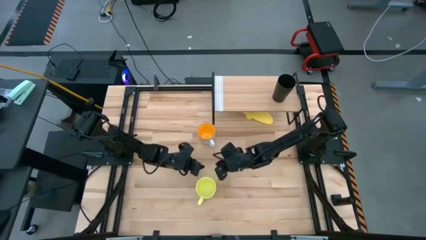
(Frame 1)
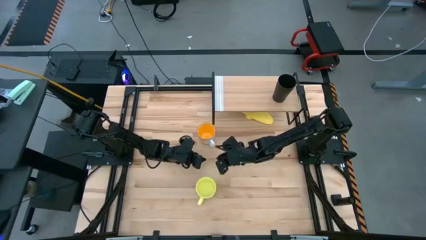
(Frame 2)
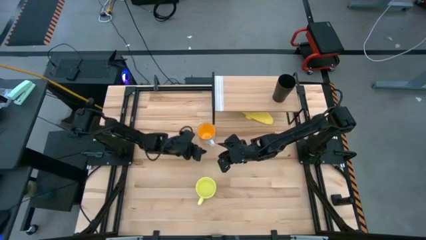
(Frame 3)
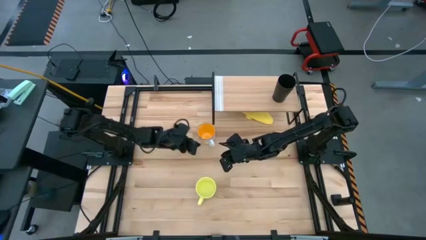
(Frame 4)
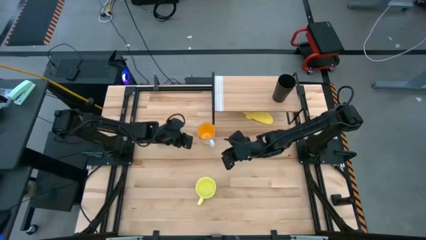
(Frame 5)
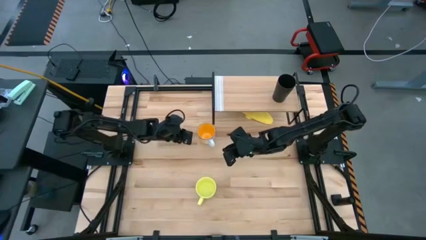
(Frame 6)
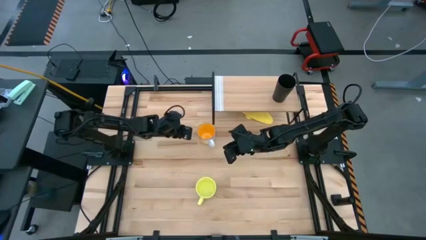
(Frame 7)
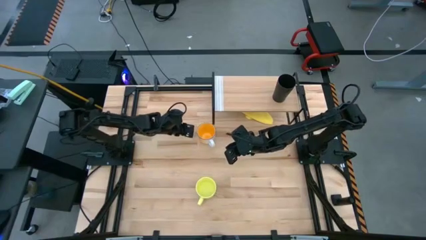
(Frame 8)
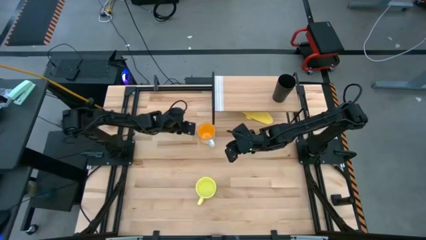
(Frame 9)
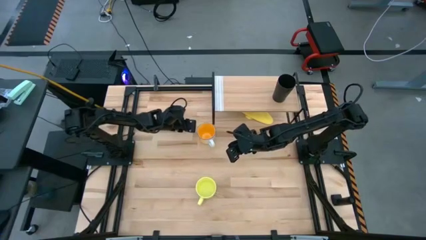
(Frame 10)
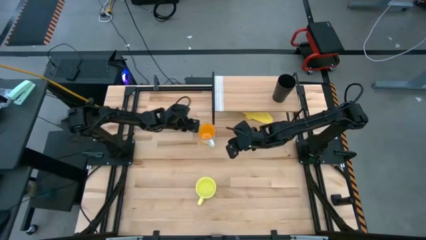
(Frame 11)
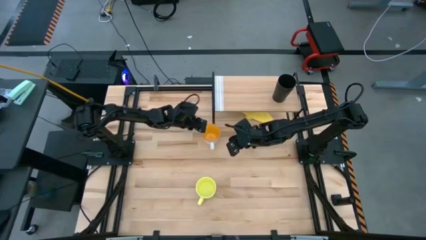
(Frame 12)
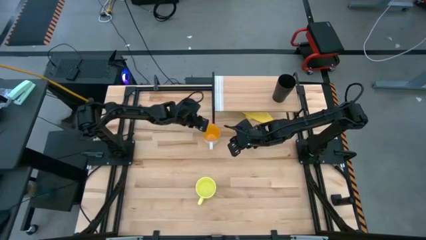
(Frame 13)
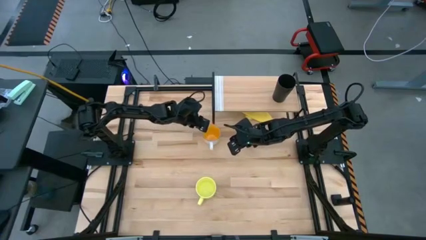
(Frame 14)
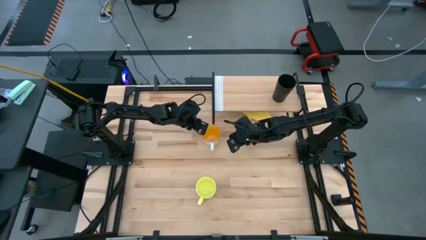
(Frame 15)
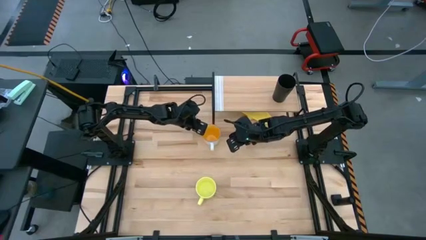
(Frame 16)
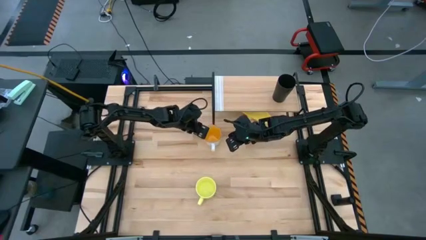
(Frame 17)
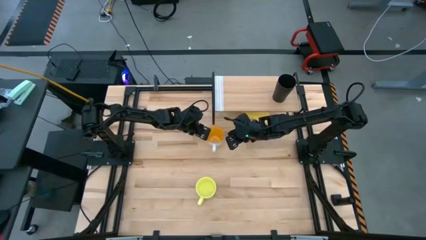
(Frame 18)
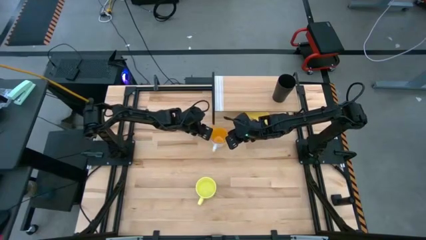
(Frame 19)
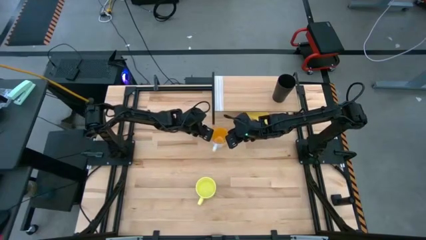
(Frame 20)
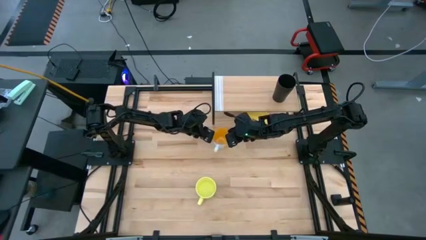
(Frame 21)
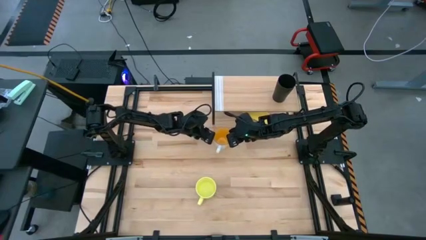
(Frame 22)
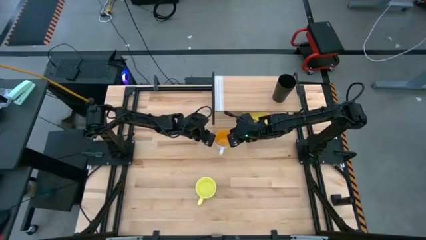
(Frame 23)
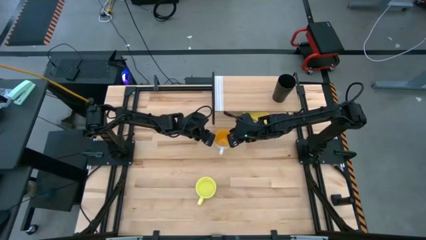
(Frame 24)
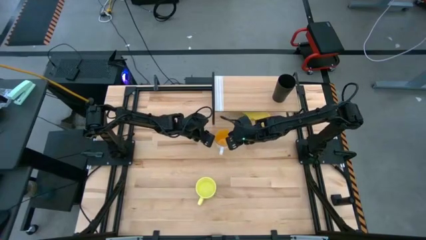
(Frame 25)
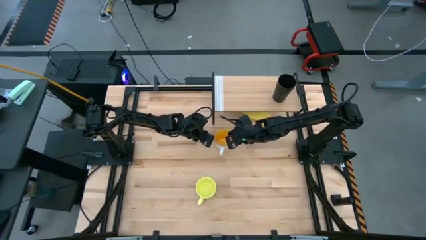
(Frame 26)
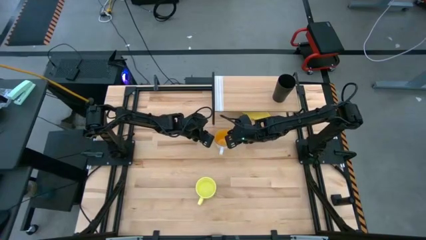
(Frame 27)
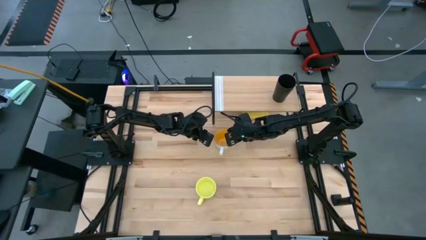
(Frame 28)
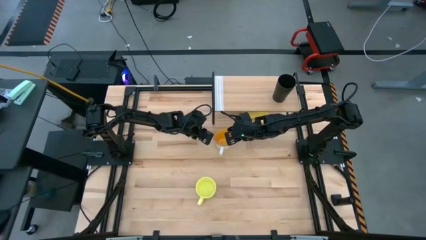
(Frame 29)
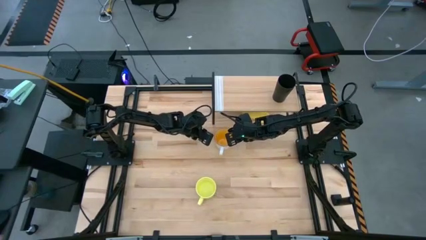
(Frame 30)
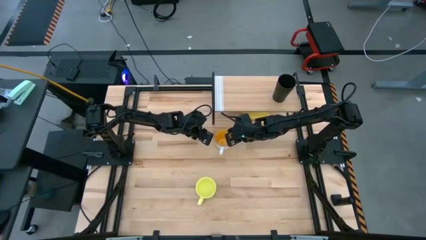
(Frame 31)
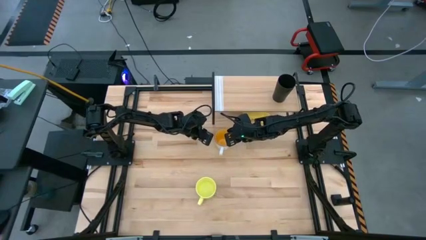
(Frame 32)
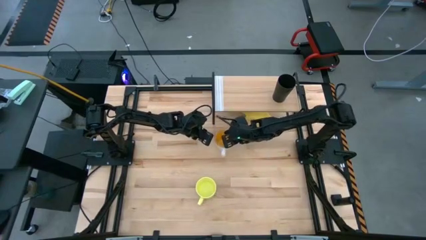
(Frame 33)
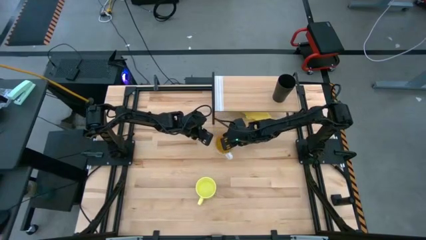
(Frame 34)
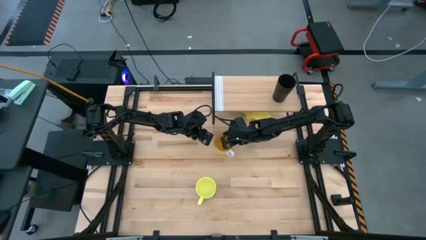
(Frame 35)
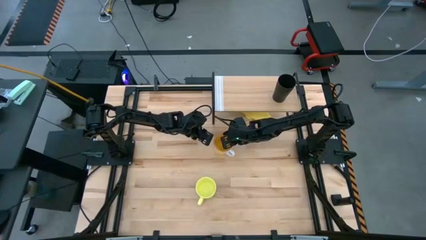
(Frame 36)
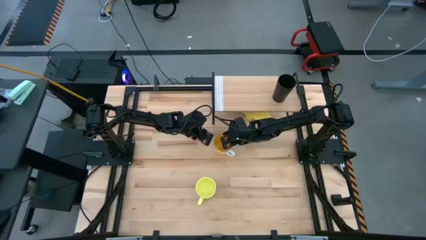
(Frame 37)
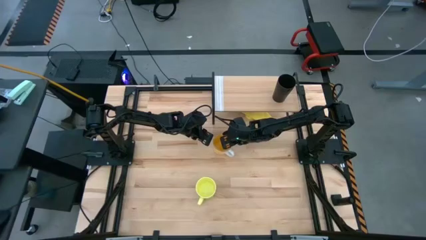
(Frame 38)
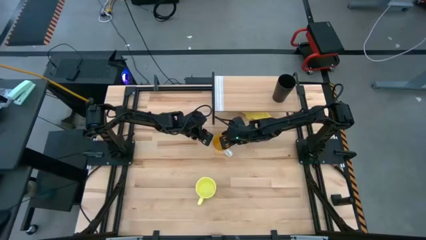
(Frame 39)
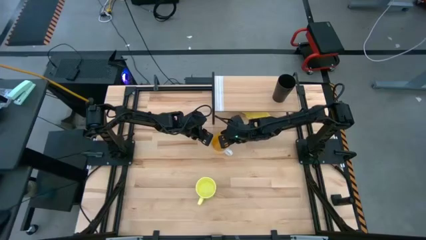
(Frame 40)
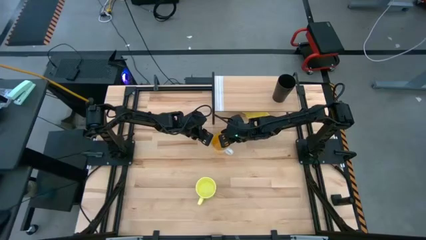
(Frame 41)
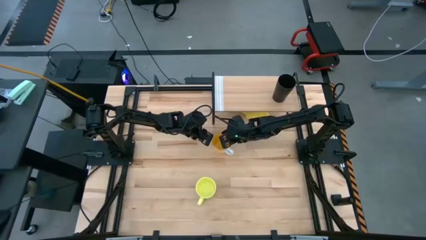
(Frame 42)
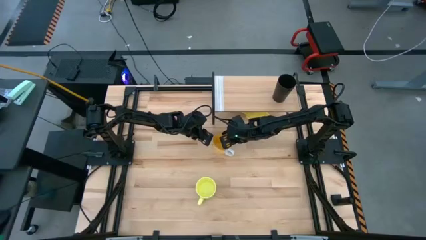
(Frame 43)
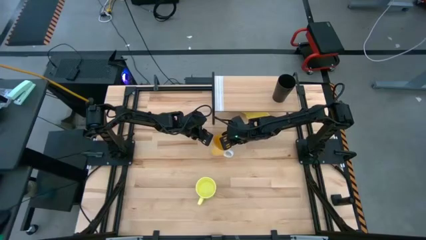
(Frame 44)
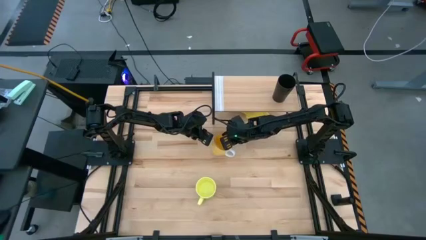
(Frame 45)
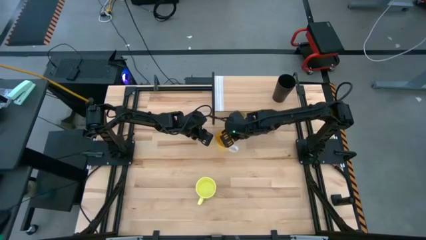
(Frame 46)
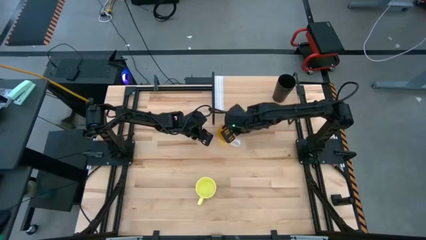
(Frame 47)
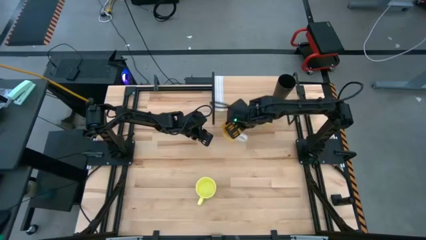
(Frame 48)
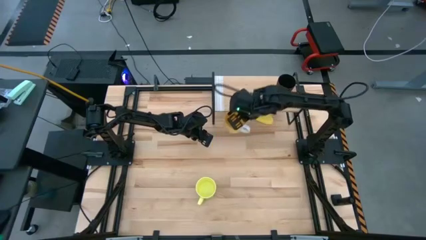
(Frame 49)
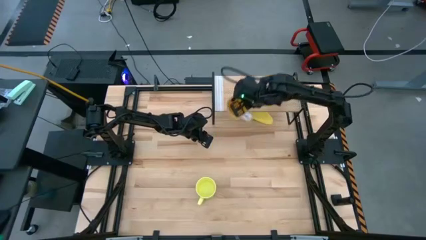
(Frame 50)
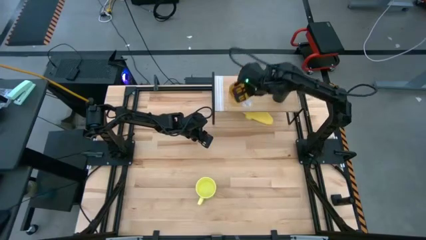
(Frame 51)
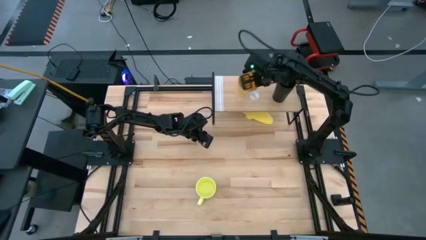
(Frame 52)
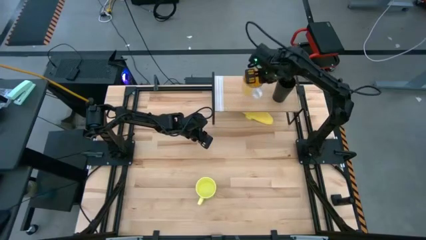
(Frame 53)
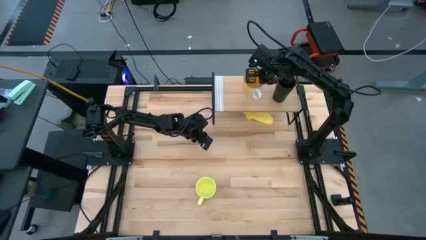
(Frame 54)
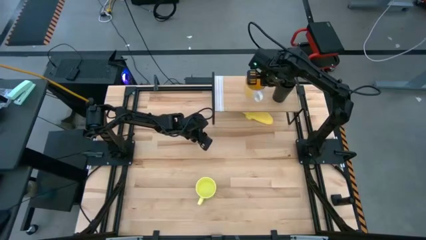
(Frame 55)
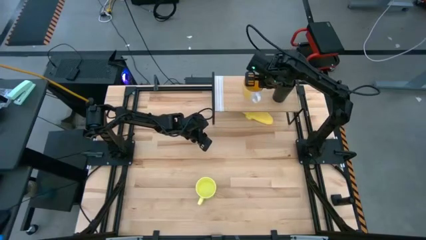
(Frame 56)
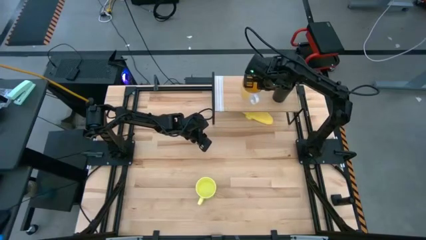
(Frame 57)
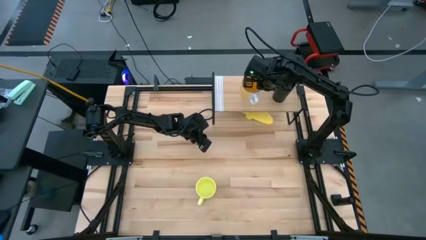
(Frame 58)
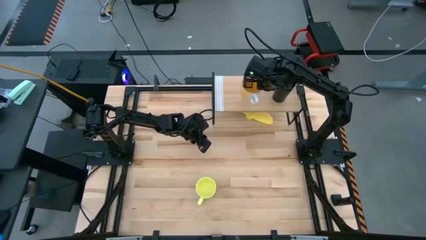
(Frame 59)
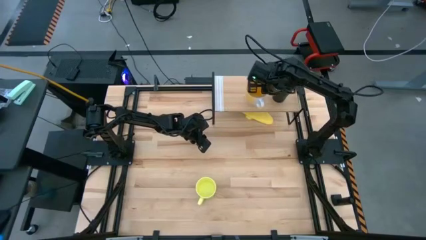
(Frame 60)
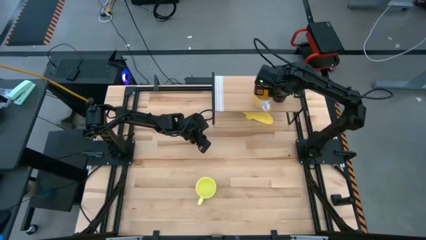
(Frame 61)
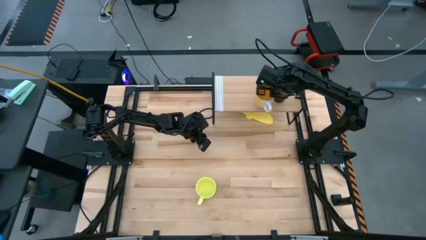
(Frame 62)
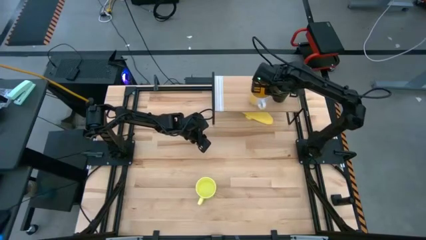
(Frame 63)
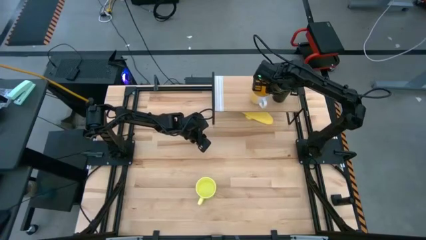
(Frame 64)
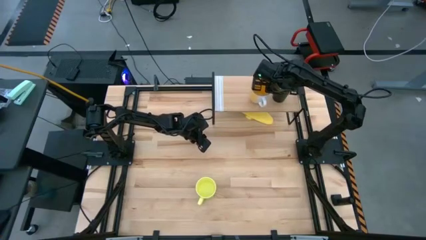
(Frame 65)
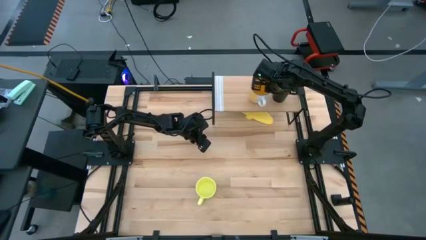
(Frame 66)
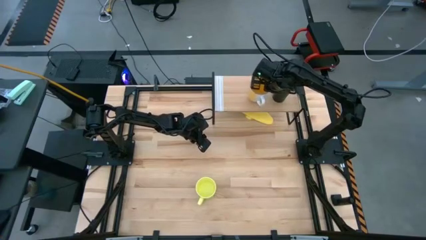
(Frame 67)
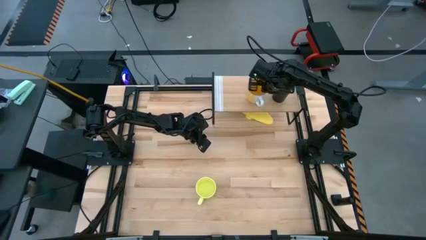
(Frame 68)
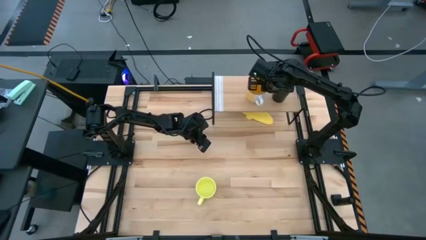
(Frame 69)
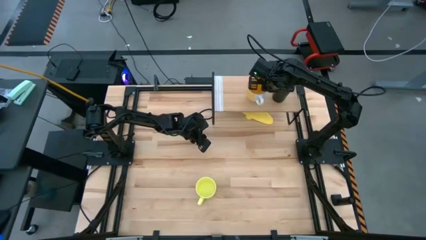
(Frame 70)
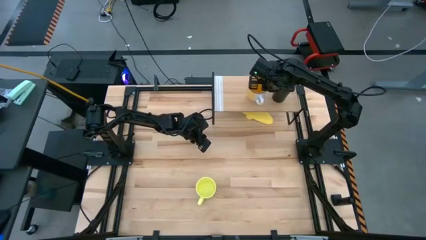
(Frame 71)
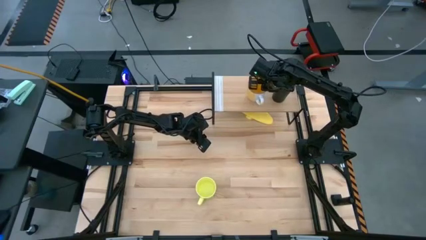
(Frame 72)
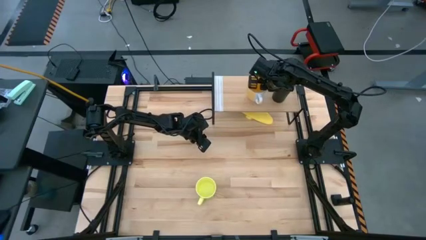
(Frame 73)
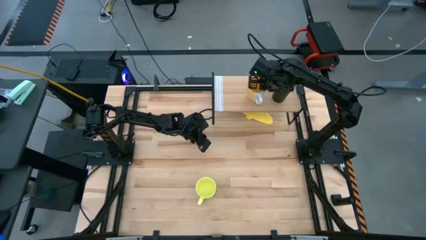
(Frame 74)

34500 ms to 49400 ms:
Task: Stack small to large cups/mugs on shelf
Put the orange mug on the shelf
